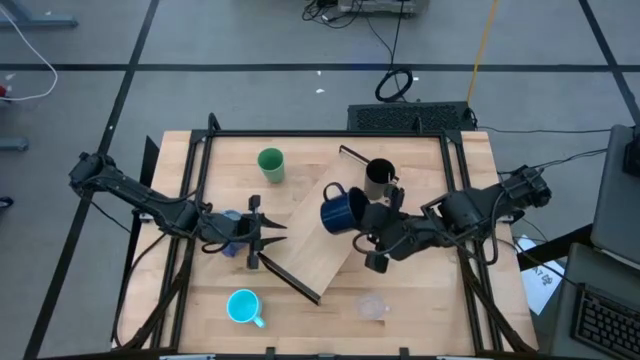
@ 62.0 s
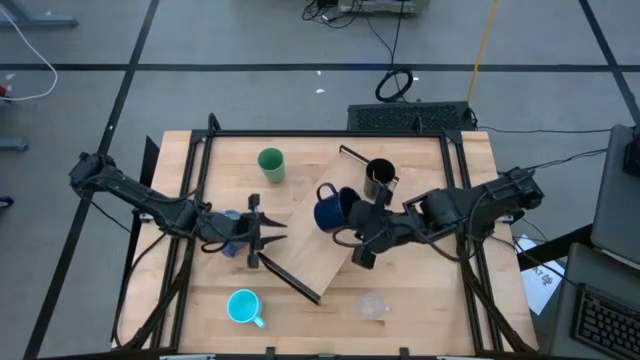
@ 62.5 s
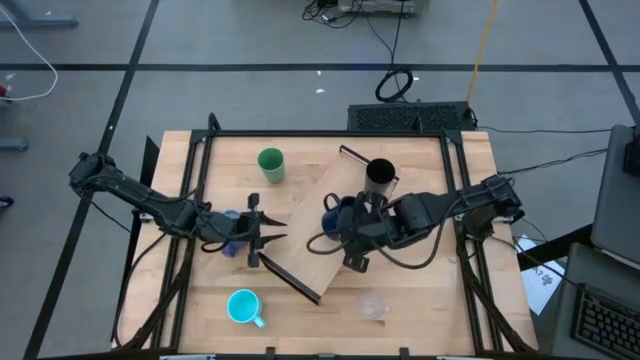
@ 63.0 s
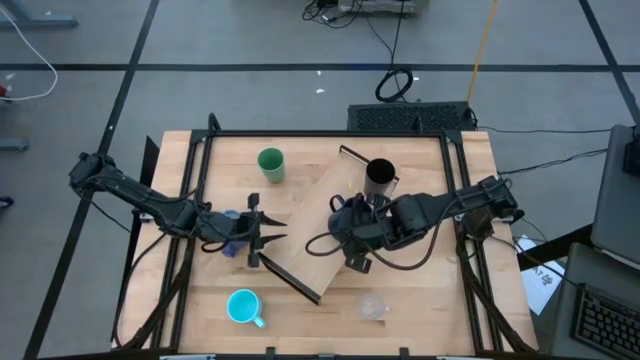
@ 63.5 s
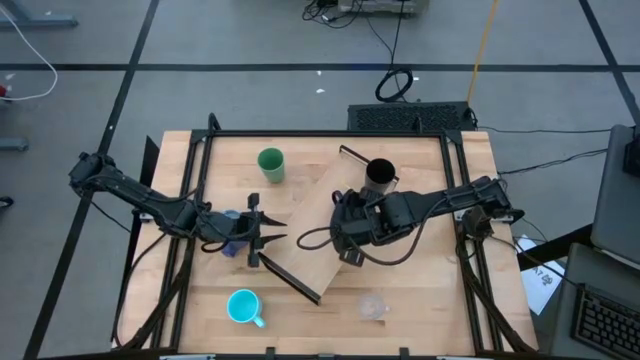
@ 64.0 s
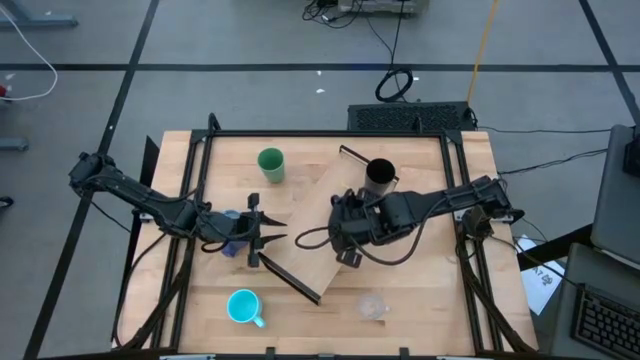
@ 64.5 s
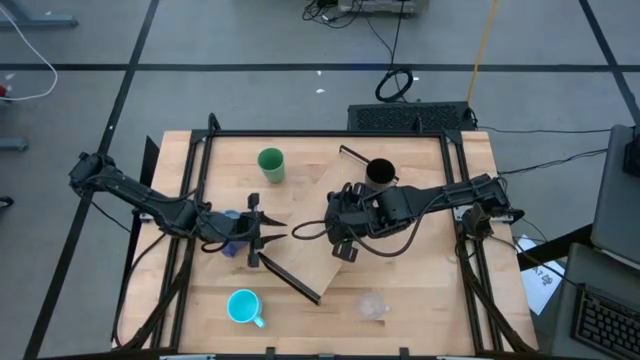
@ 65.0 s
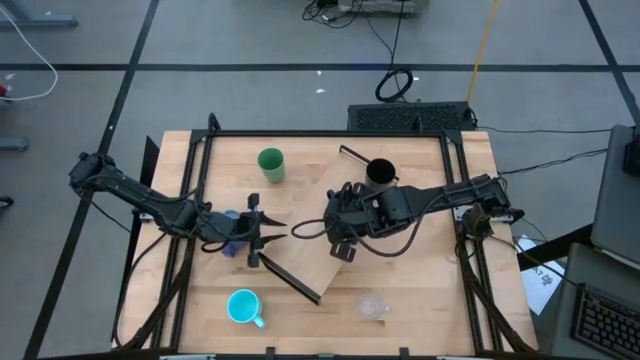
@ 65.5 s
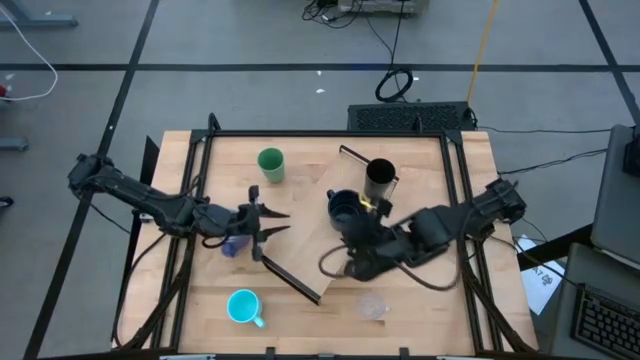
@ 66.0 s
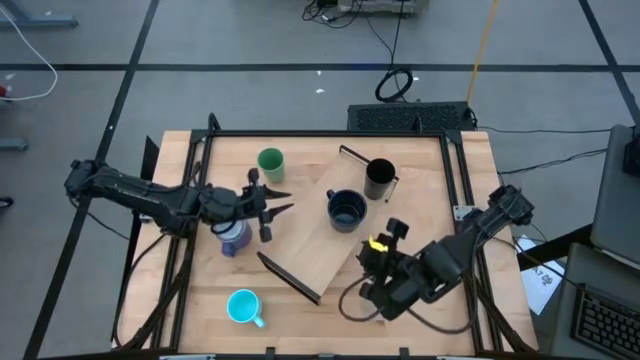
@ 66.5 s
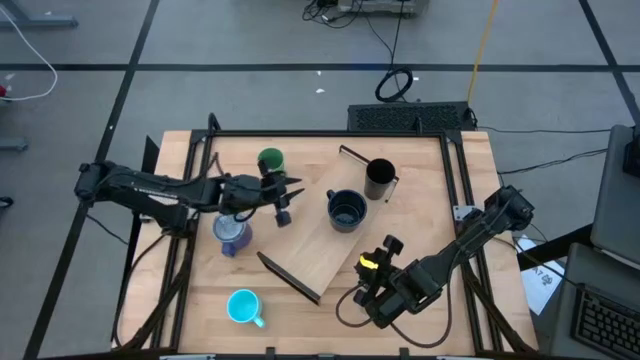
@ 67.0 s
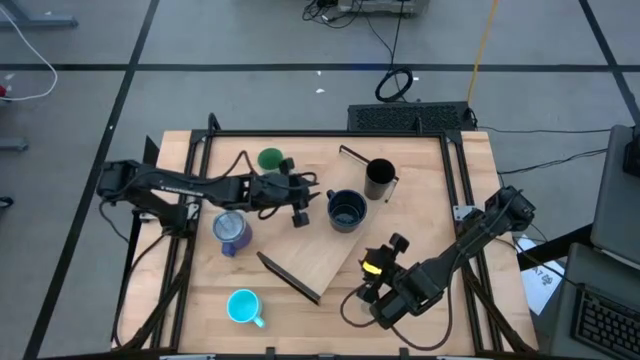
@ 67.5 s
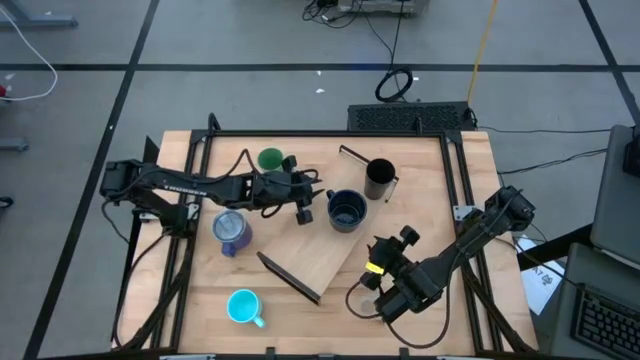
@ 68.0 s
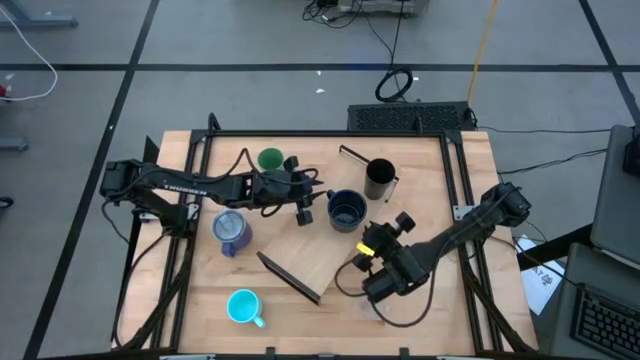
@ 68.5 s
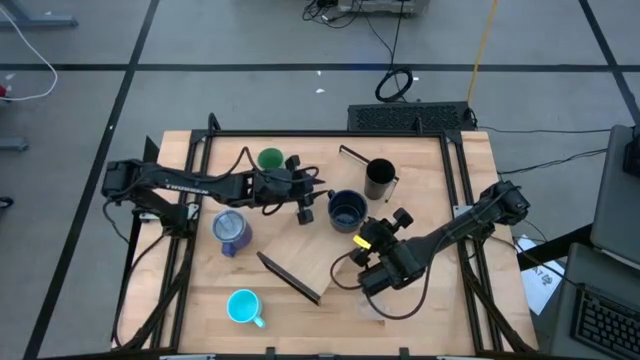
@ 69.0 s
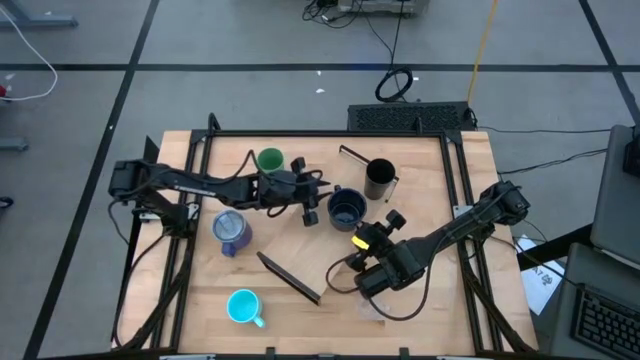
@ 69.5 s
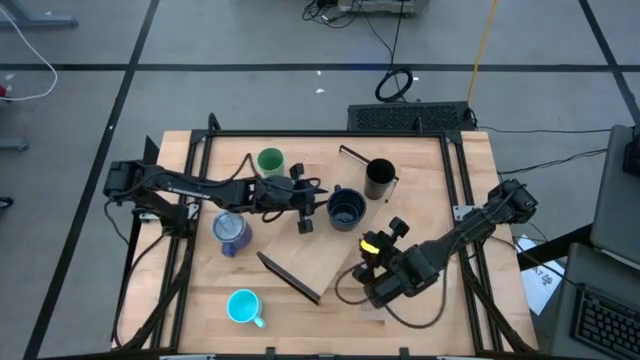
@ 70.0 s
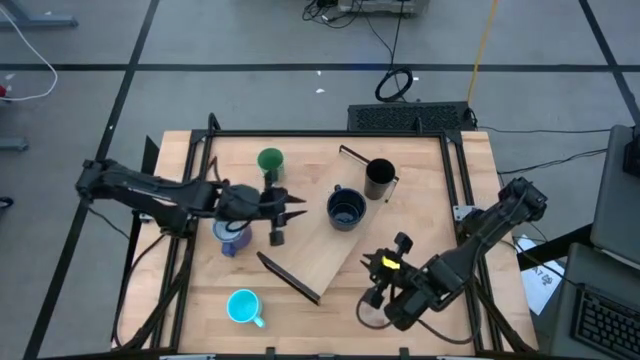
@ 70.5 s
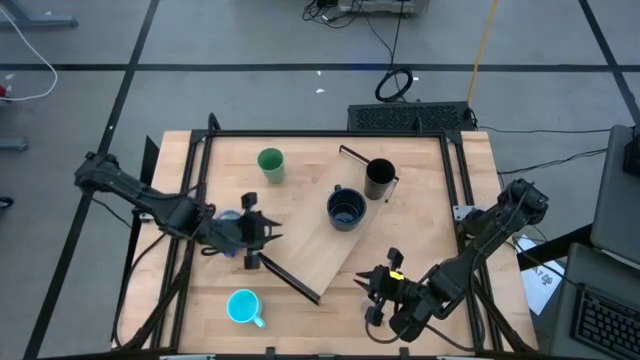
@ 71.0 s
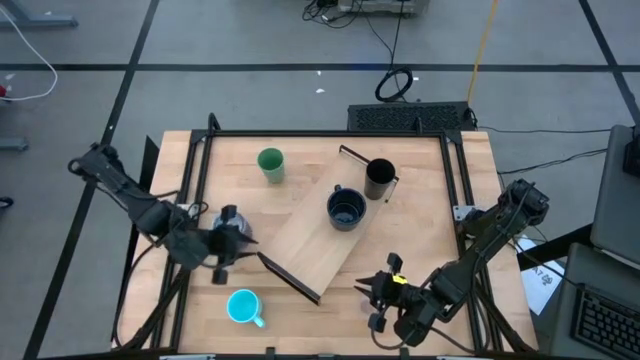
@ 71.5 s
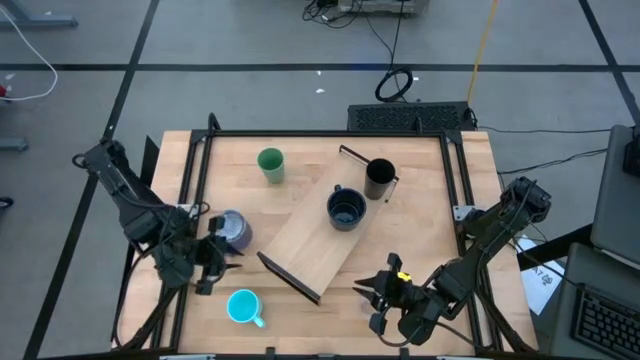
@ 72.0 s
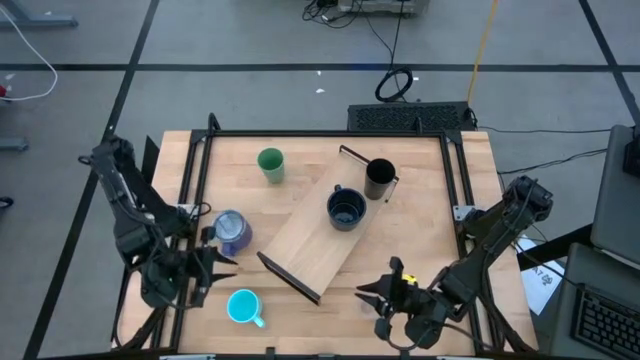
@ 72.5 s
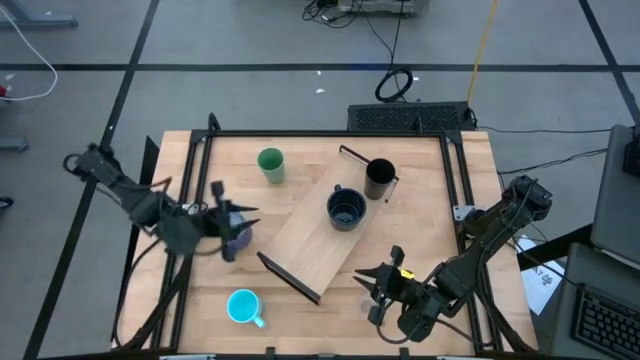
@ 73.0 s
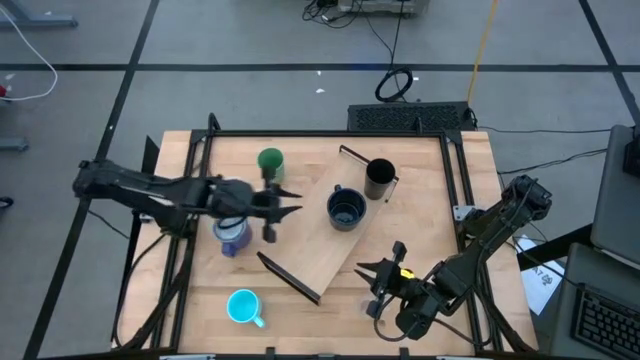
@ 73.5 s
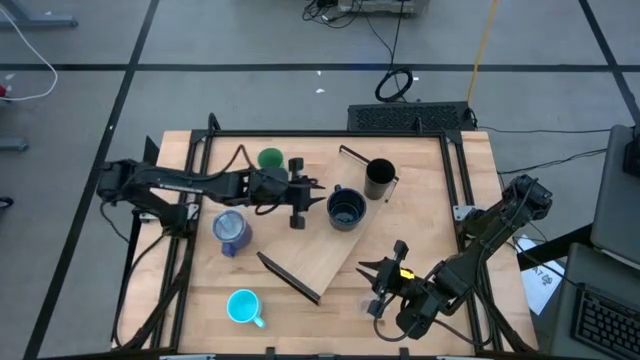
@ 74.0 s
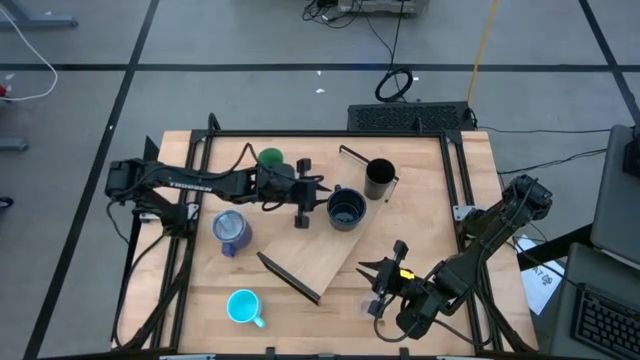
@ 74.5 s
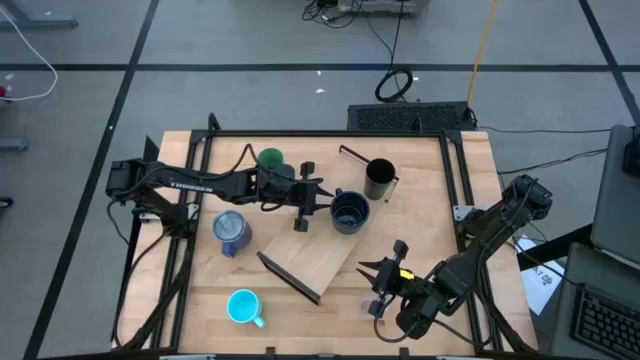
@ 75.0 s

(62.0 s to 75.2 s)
Task: Stack small to large cups/mugs on shelf
Put the dark blue cup on the shelf
